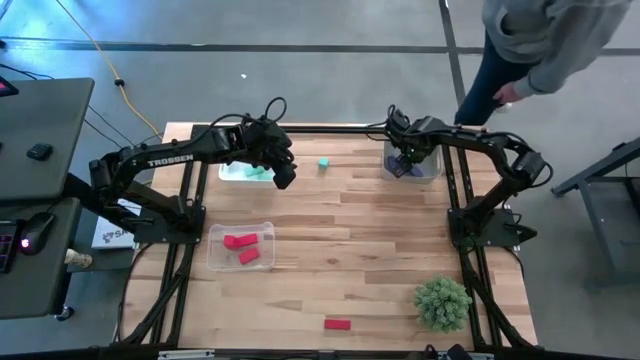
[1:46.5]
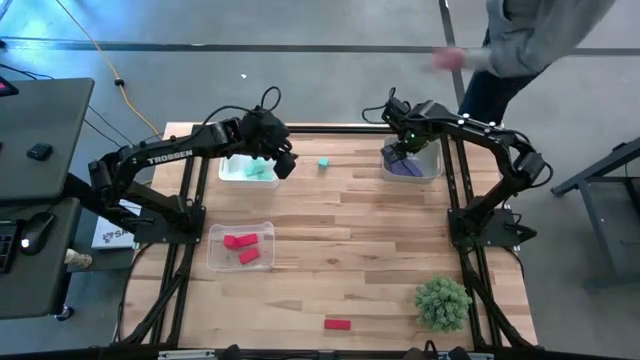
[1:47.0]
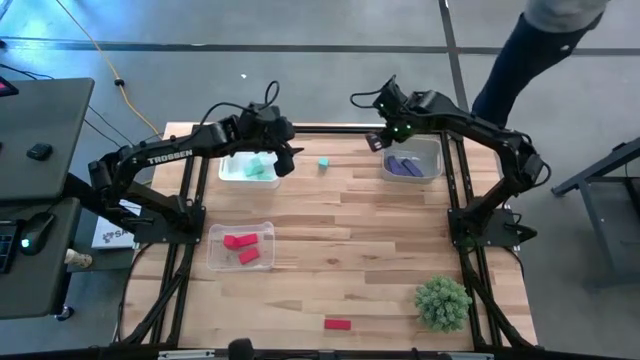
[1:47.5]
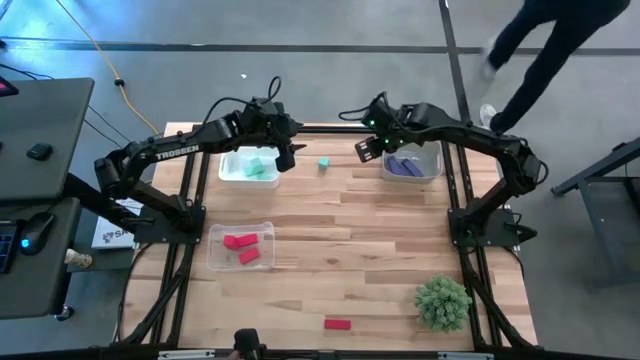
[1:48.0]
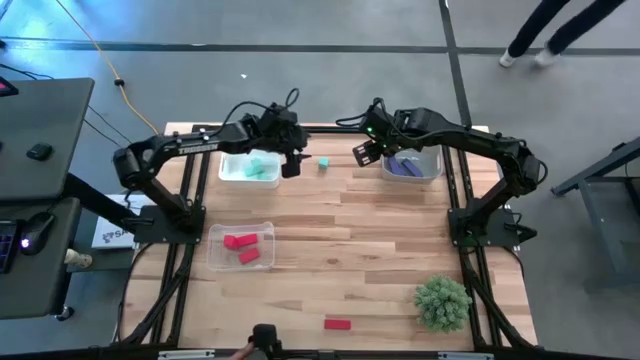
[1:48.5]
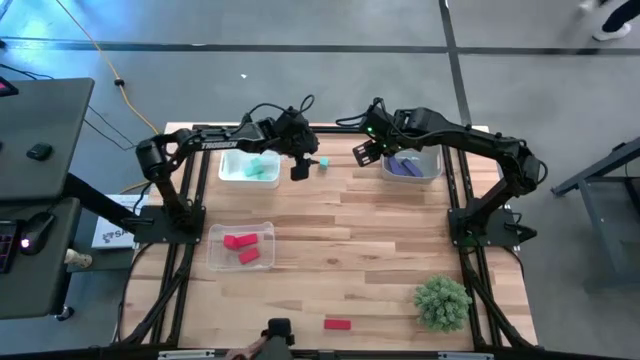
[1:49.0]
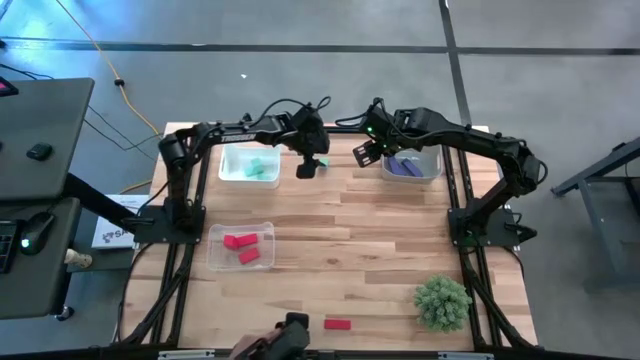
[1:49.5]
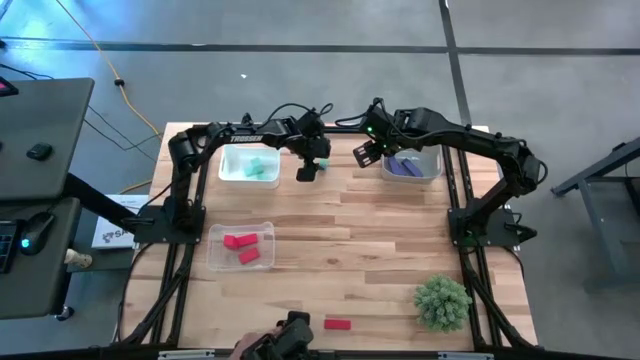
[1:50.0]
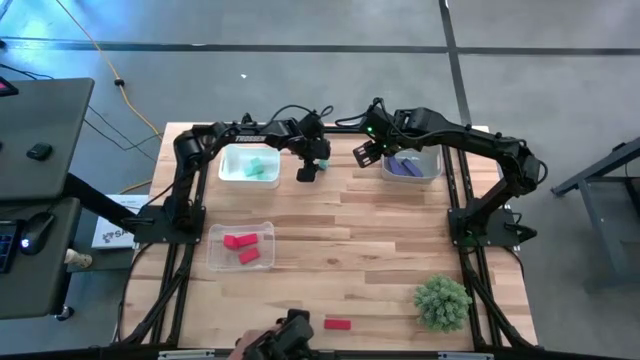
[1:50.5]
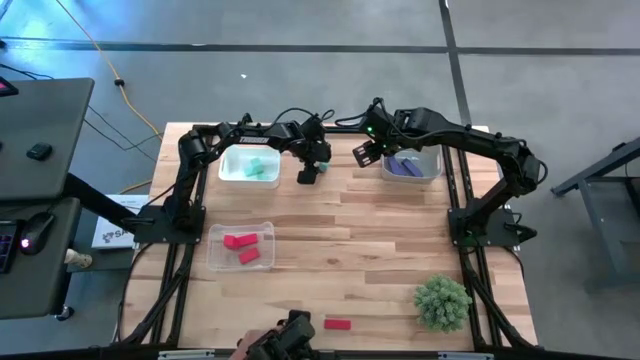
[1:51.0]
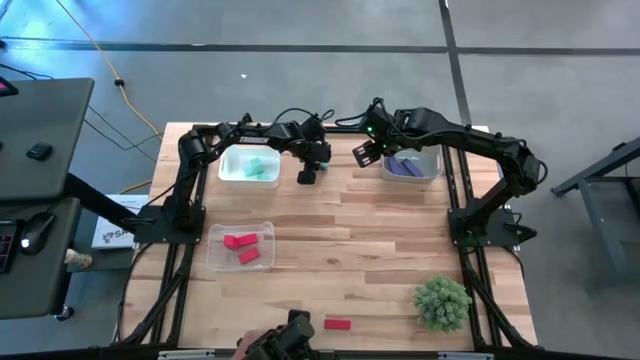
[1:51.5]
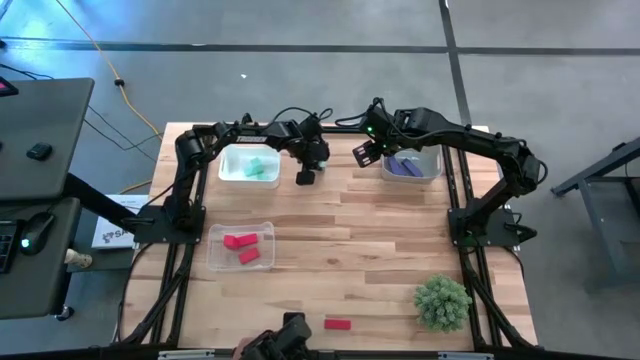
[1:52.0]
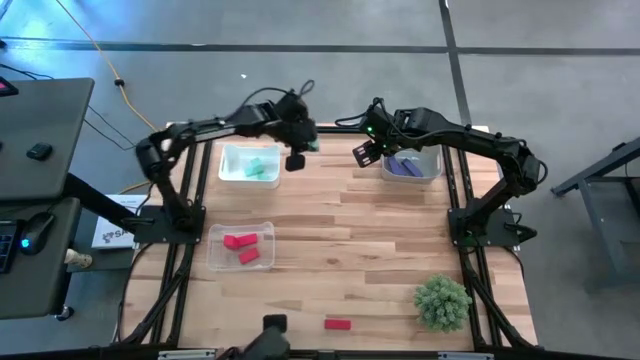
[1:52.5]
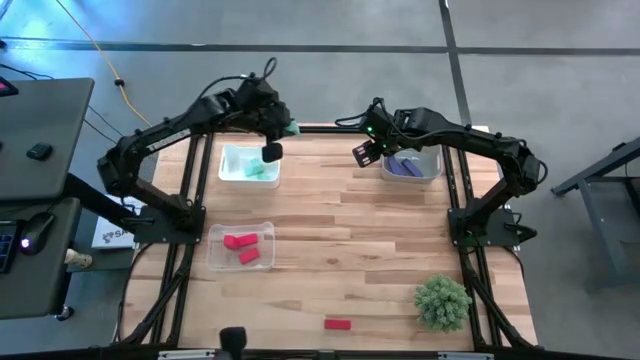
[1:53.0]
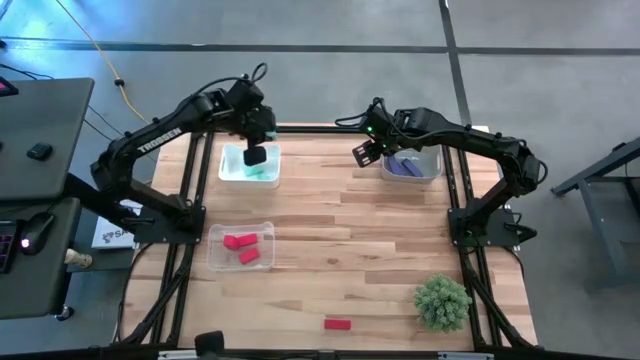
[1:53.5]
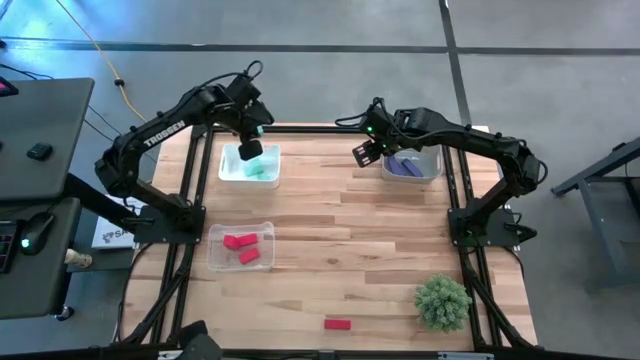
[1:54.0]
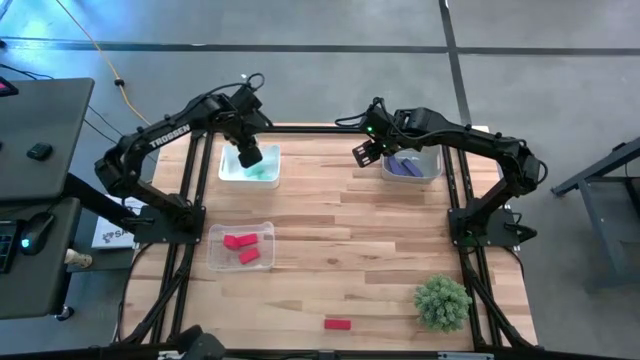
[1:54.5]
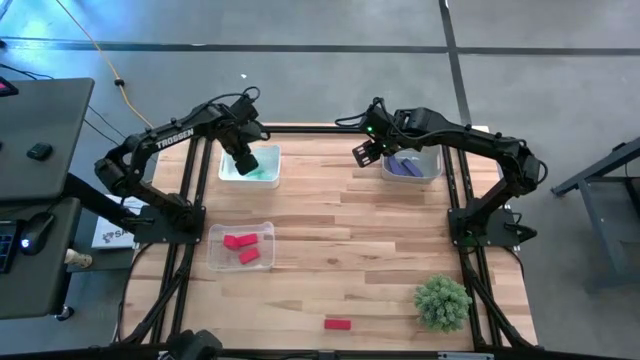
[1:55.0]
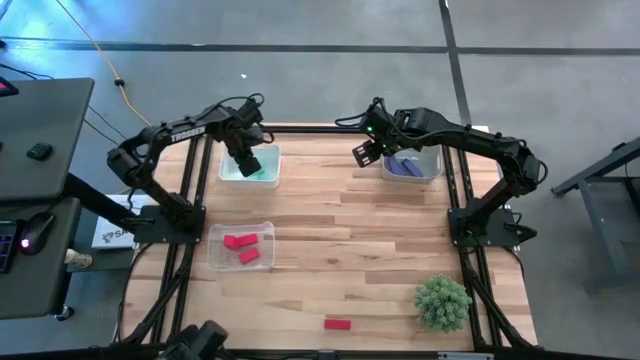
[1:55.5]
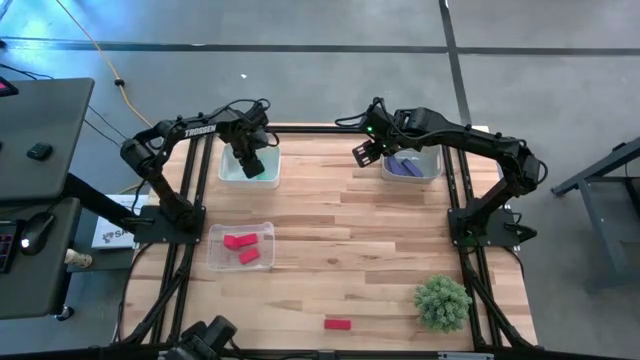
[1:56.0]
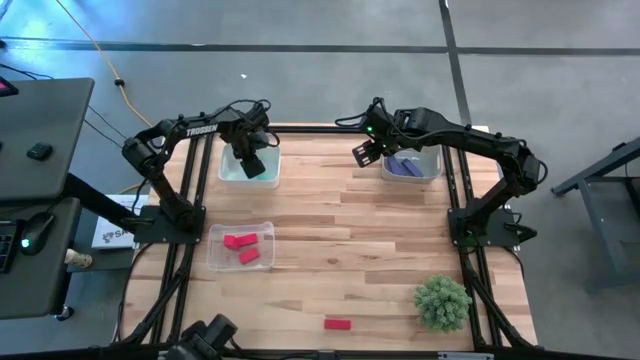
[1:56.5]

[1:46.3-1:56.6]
Task: Sort & place blocks by color
Put the light blue block into the white bin

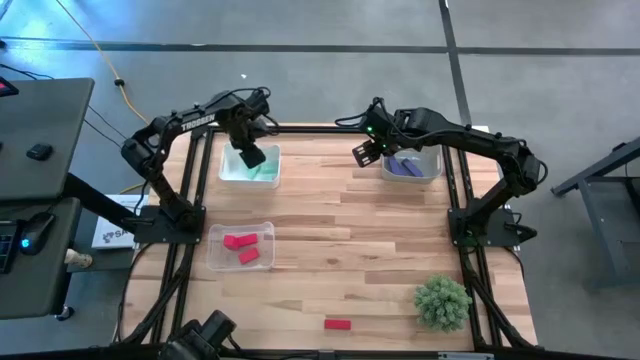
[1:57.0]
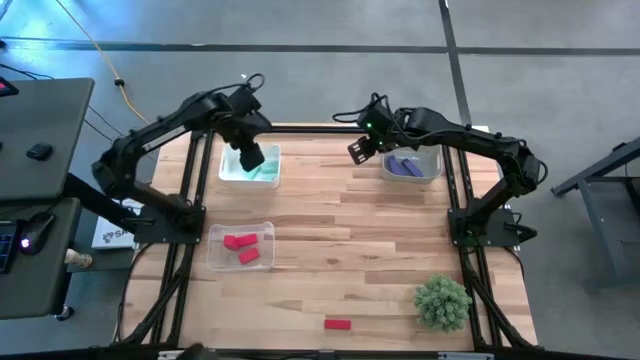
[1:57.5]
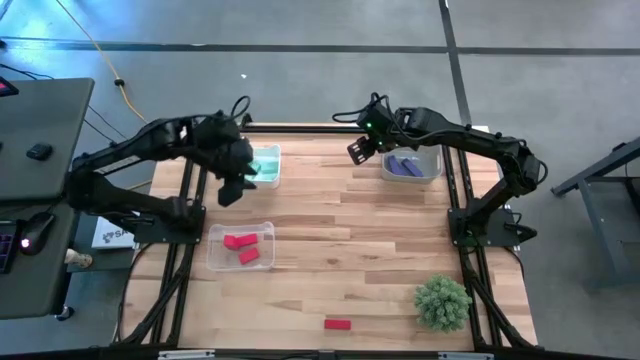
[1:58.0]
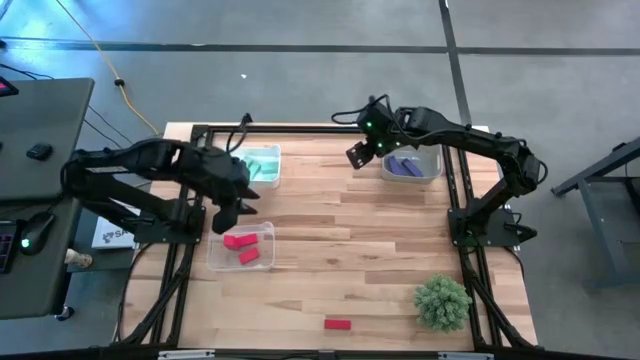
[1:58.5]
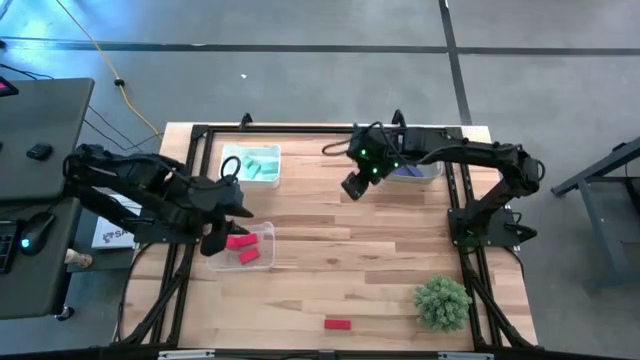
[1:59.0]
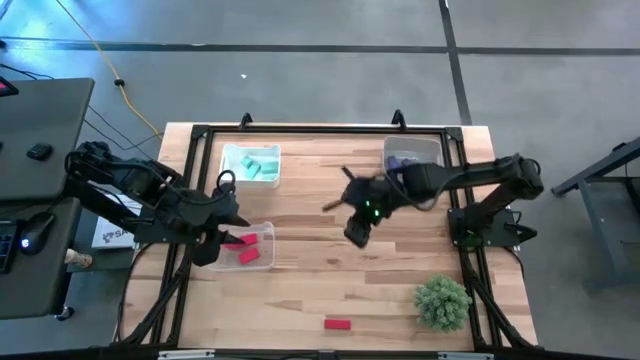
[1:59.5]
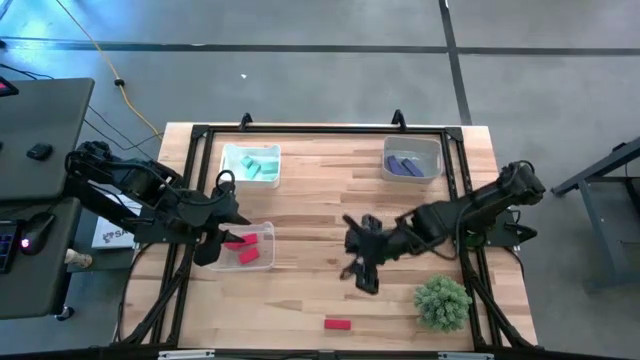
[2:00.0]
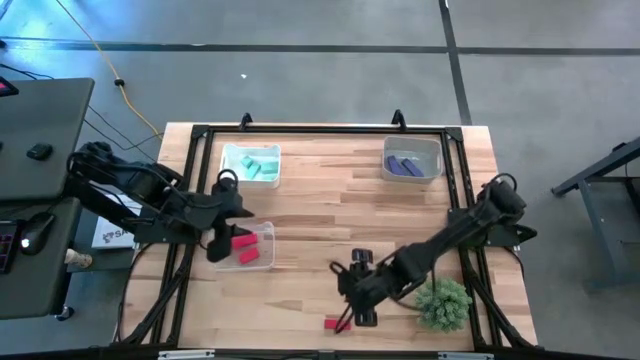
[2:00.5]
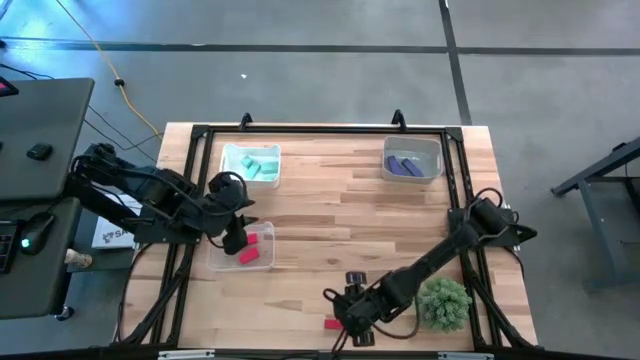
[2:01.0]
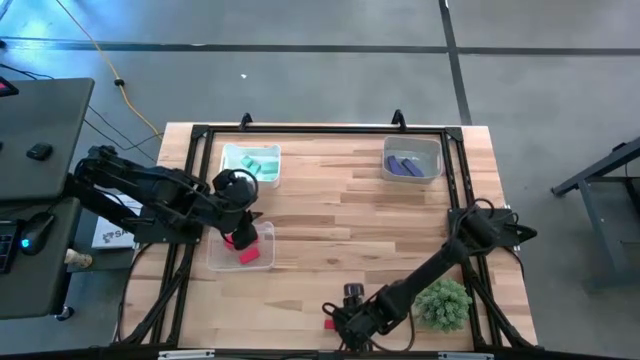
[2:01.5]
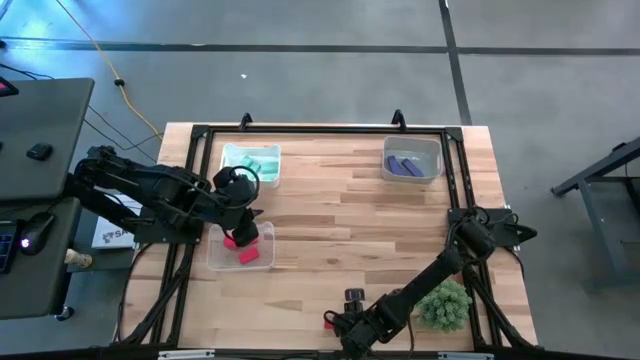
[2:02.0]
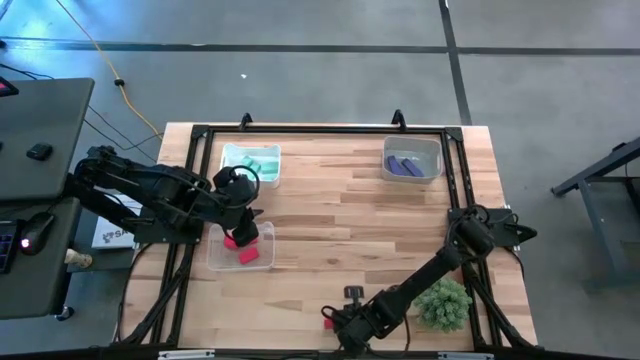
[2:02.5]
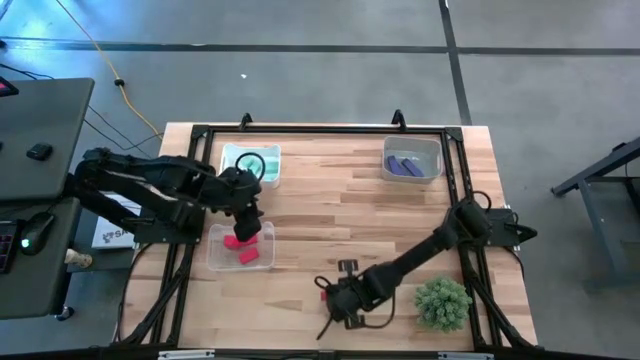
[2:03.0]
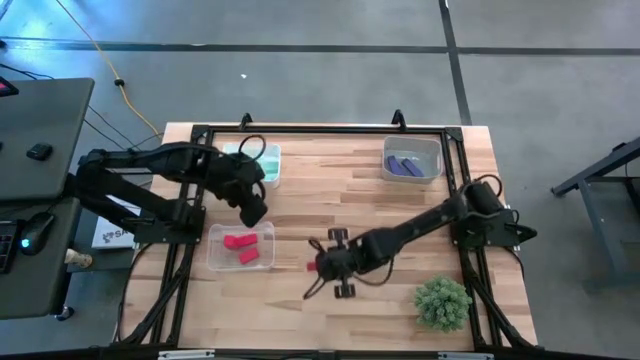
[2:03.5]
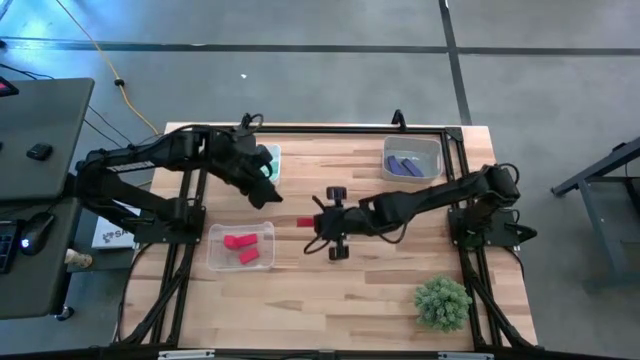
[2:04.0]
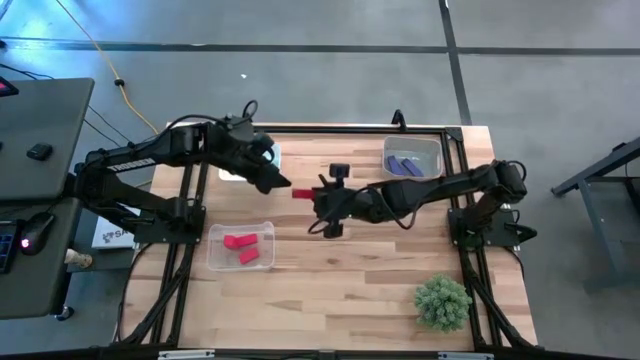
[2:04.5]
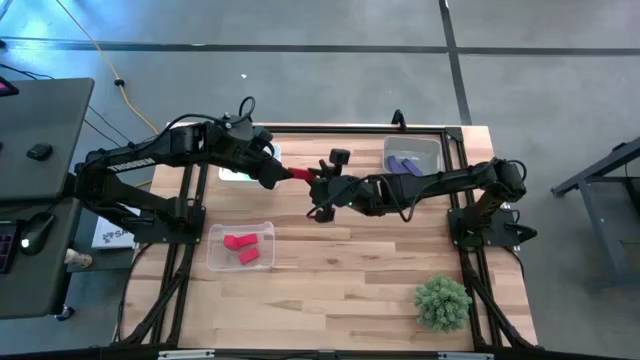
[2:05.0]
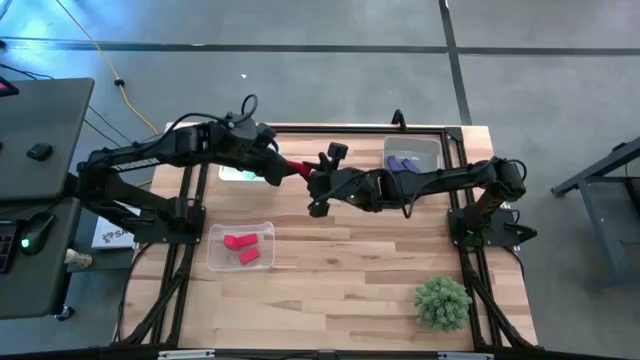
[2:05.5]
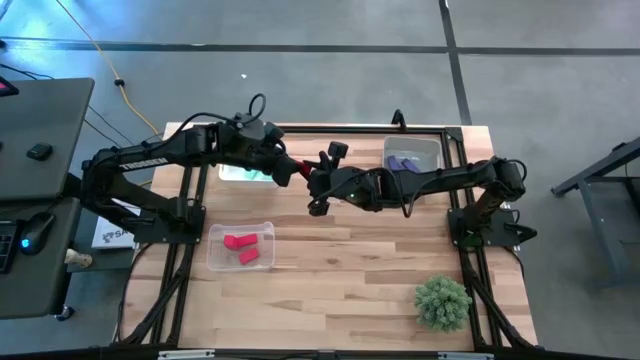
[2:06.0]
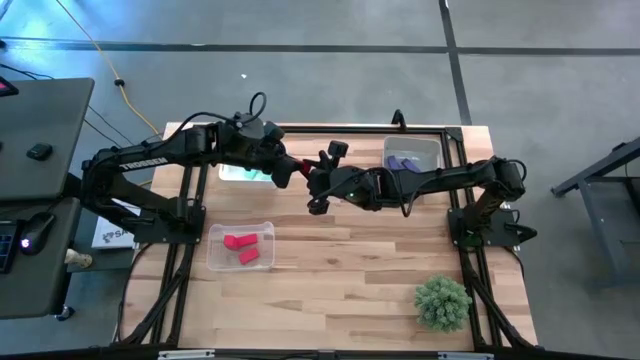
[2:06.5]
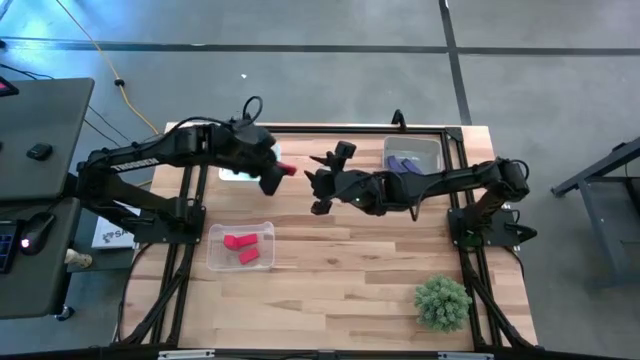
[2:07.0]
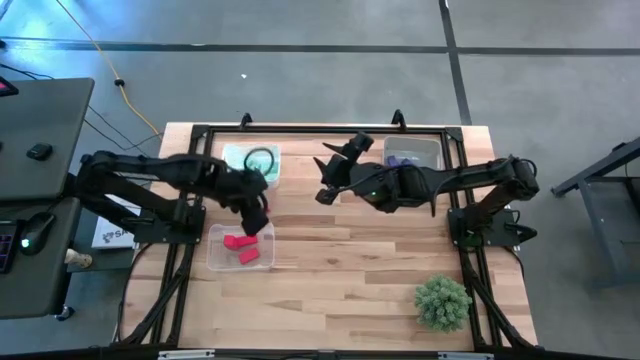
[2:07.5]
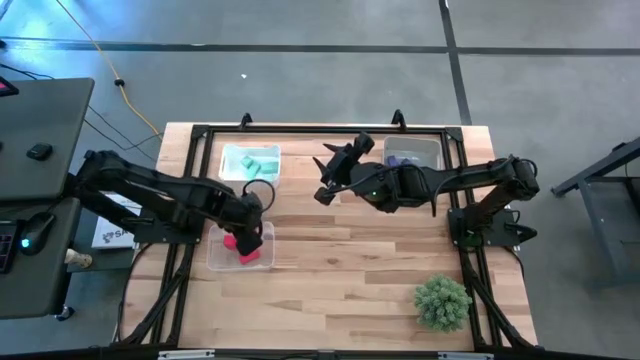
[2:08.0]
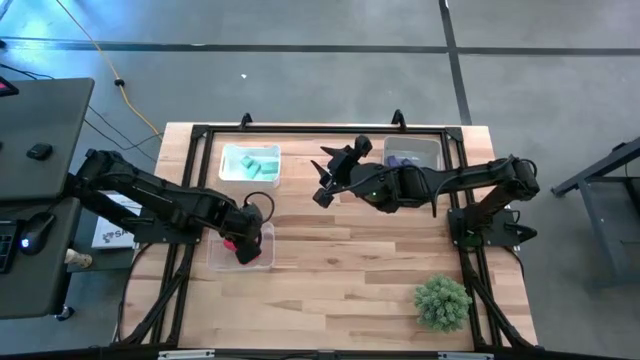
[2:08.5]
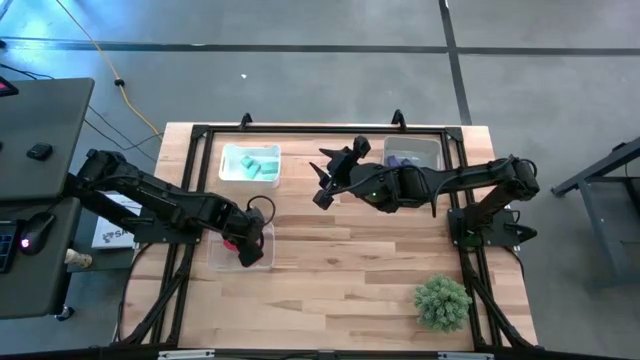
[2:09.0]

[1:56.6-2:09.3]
Put the red block into the transparent bin
